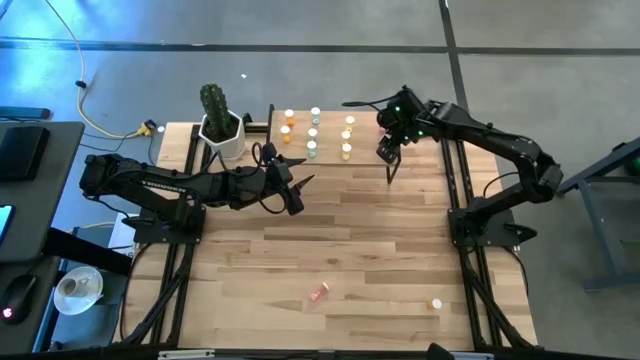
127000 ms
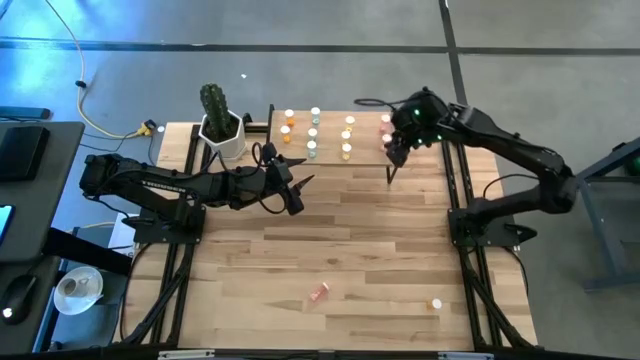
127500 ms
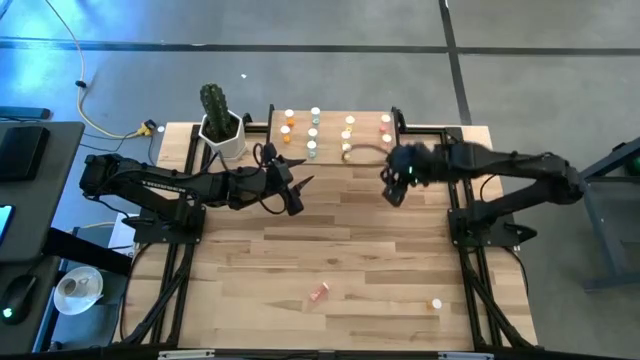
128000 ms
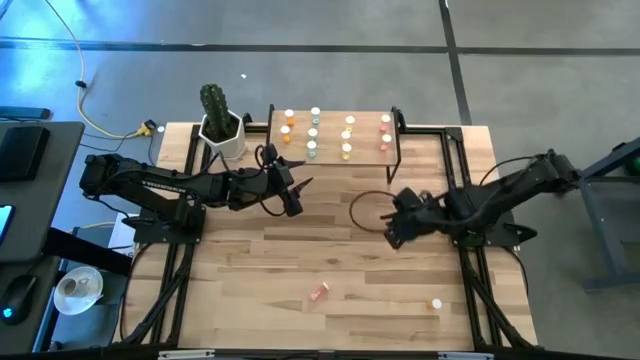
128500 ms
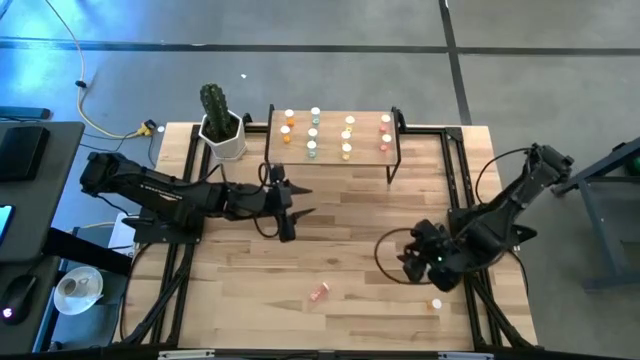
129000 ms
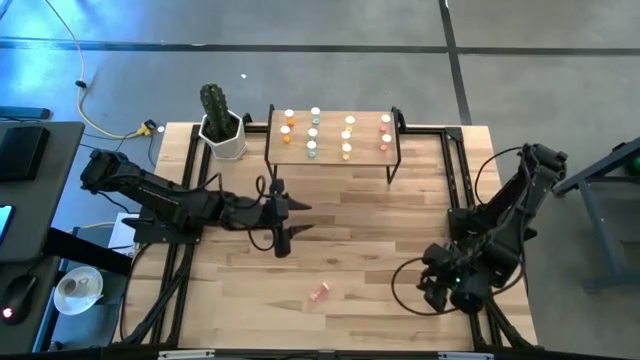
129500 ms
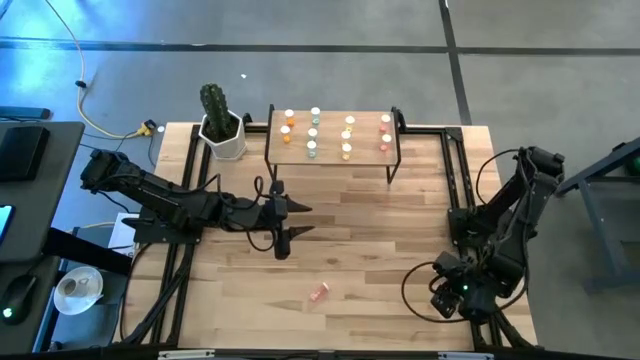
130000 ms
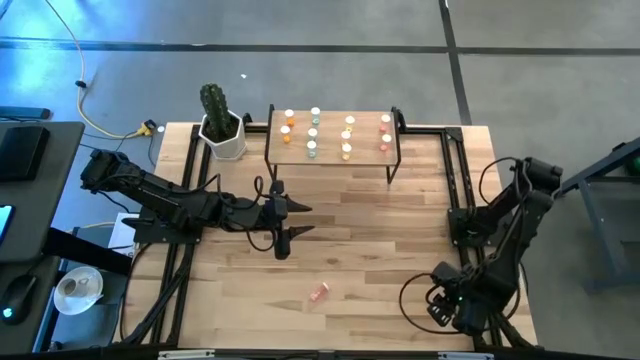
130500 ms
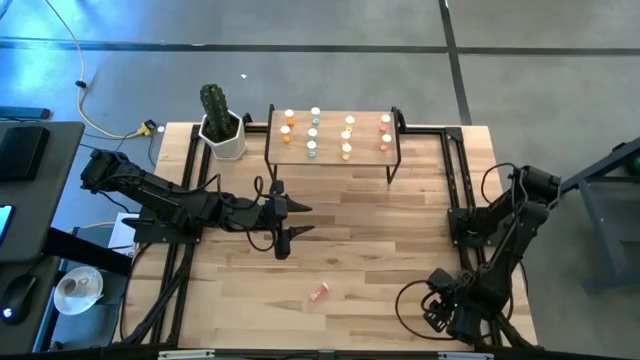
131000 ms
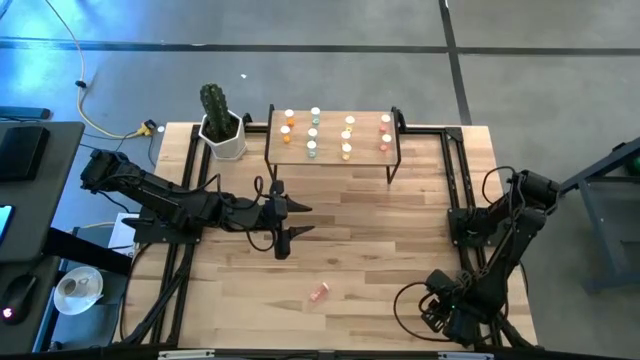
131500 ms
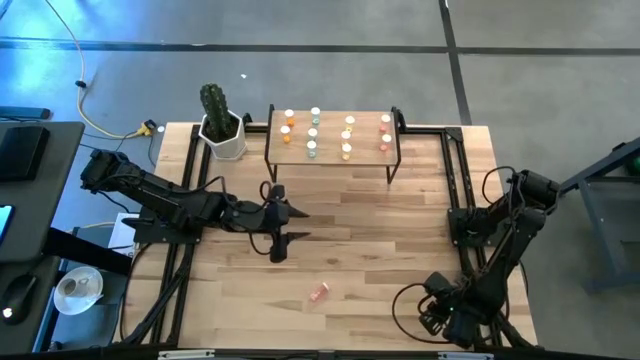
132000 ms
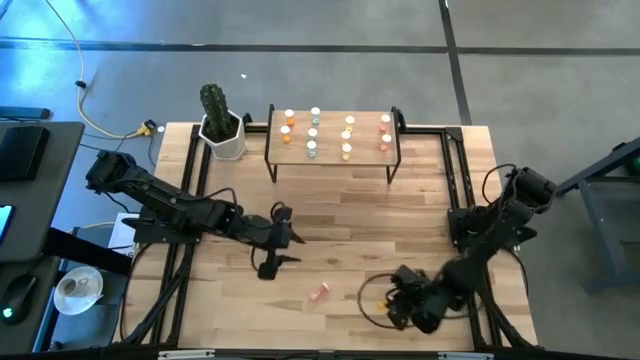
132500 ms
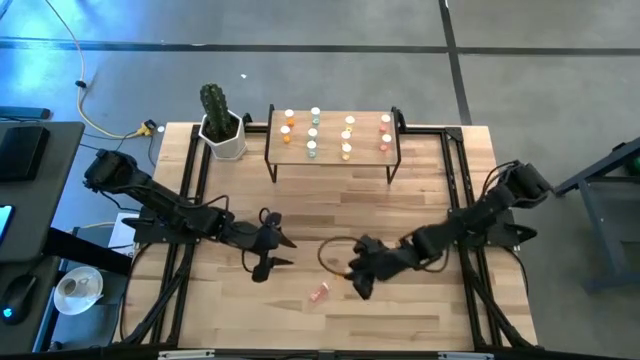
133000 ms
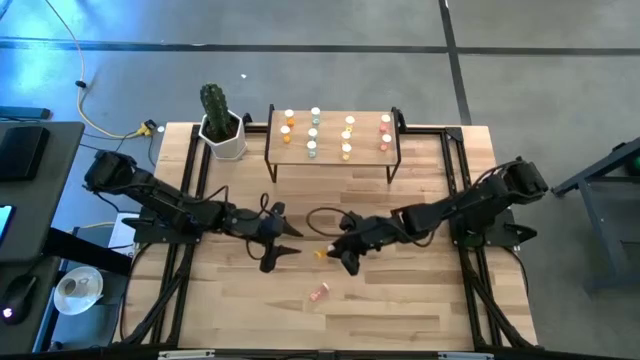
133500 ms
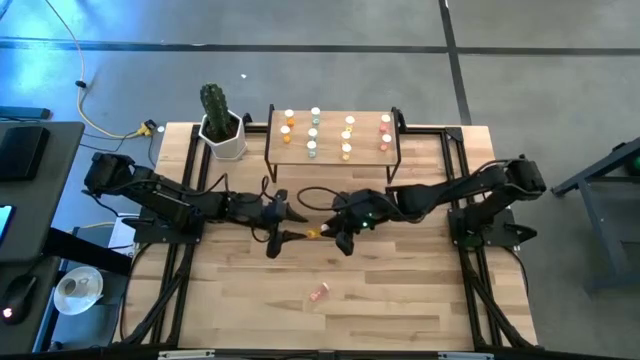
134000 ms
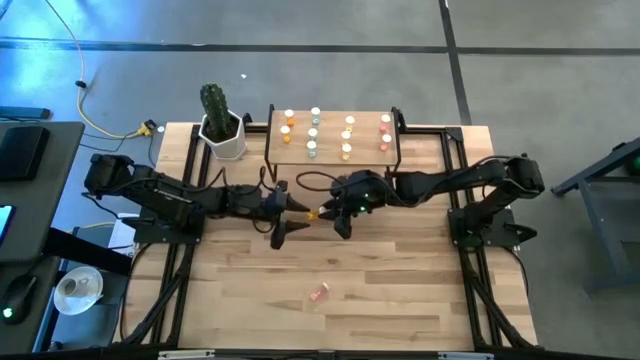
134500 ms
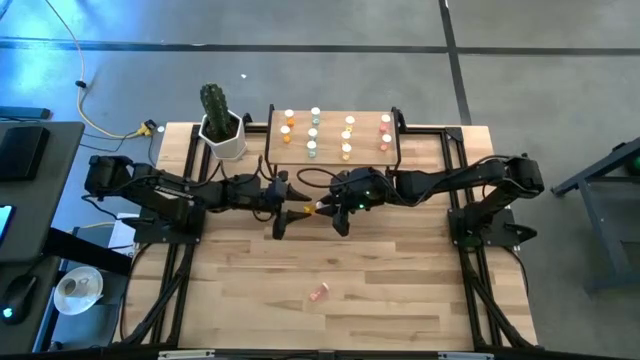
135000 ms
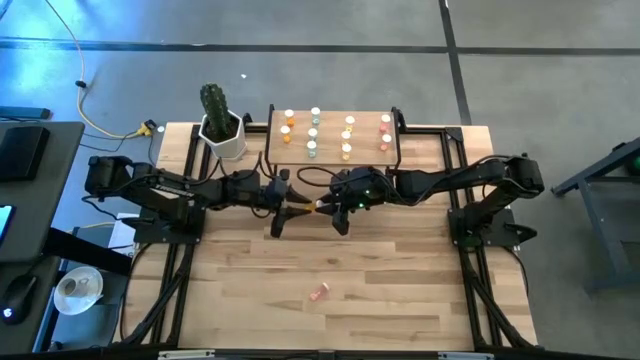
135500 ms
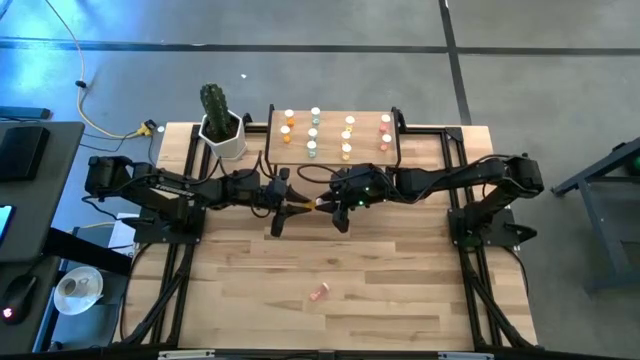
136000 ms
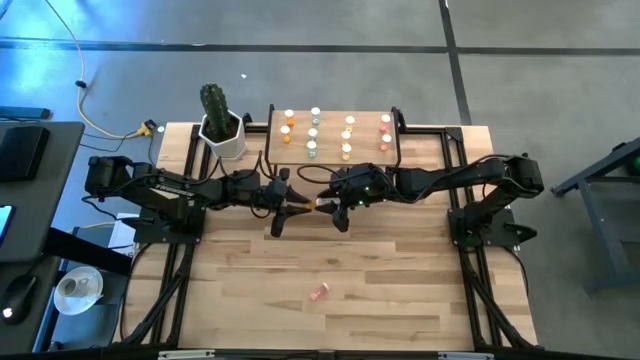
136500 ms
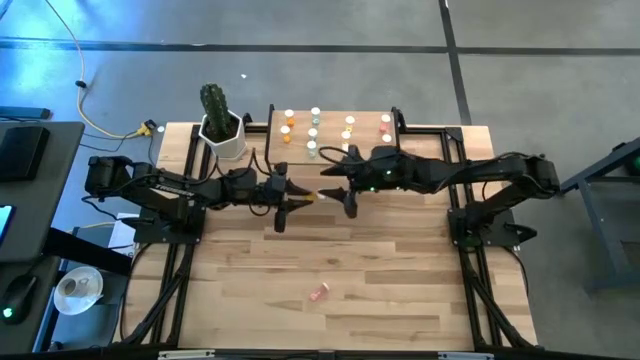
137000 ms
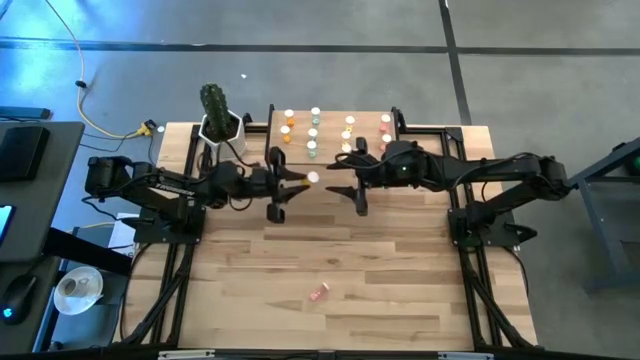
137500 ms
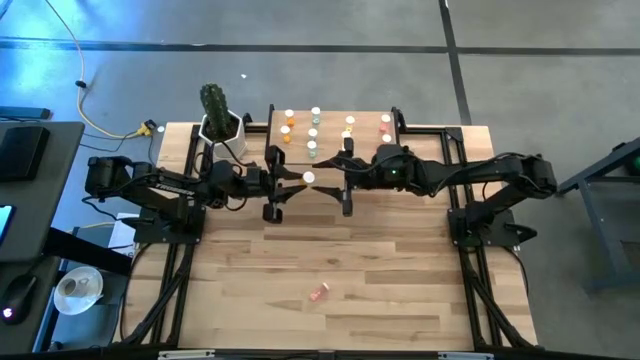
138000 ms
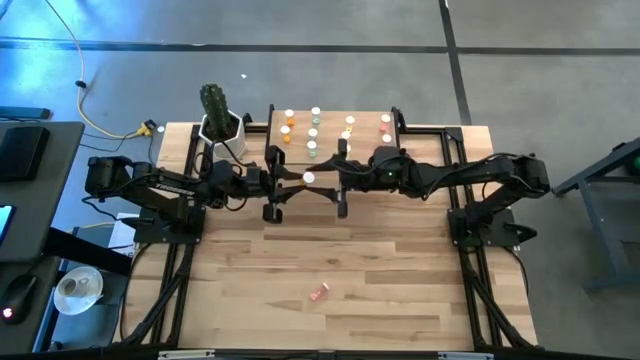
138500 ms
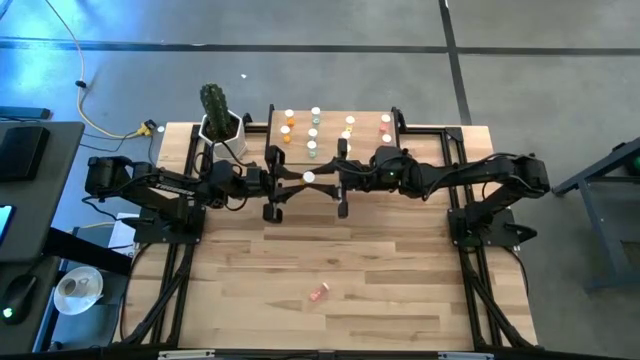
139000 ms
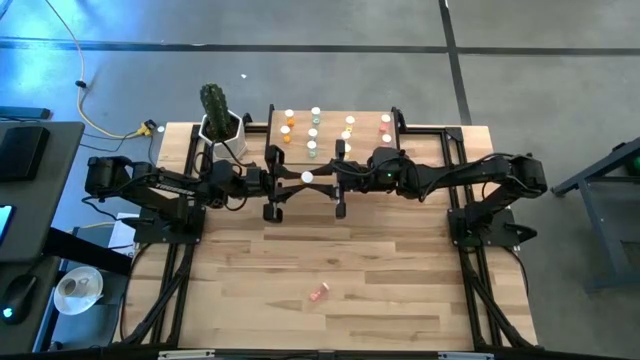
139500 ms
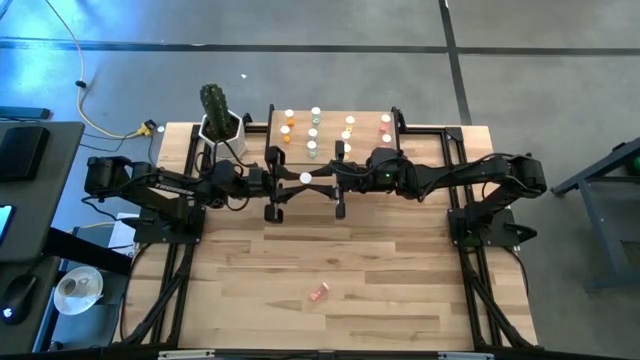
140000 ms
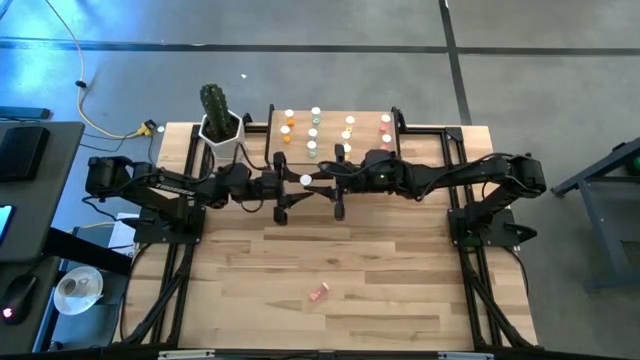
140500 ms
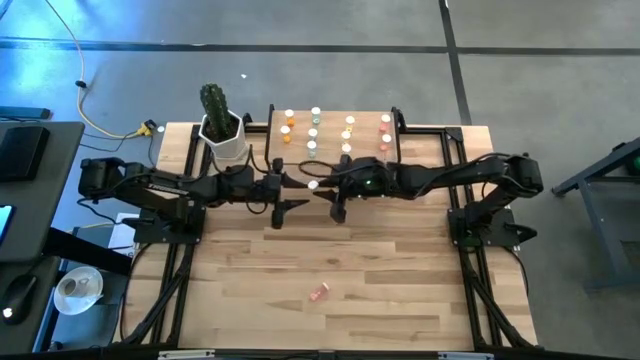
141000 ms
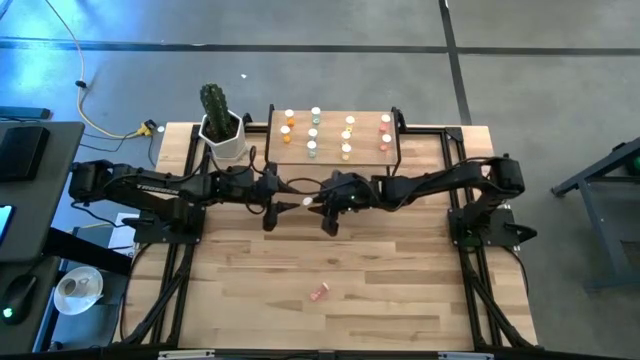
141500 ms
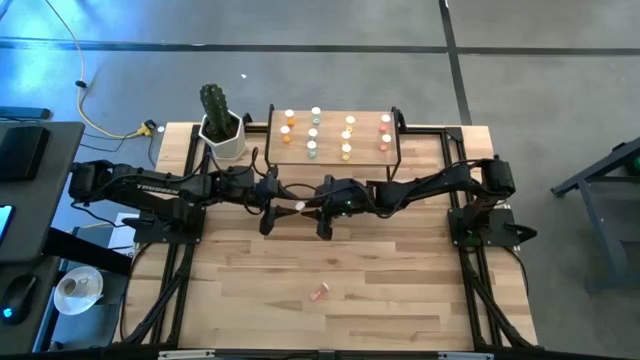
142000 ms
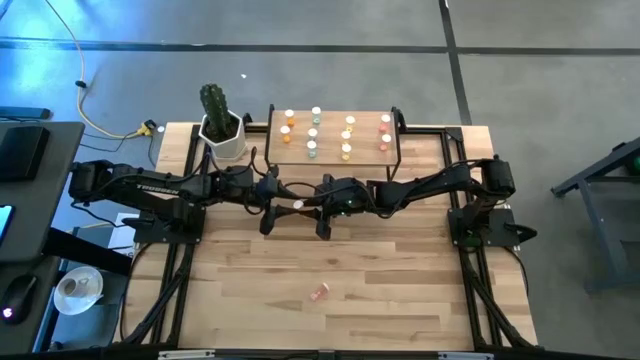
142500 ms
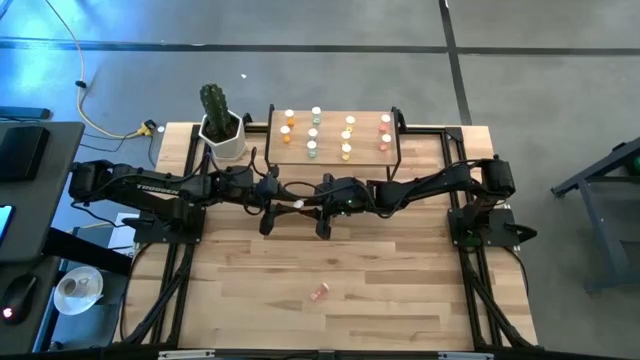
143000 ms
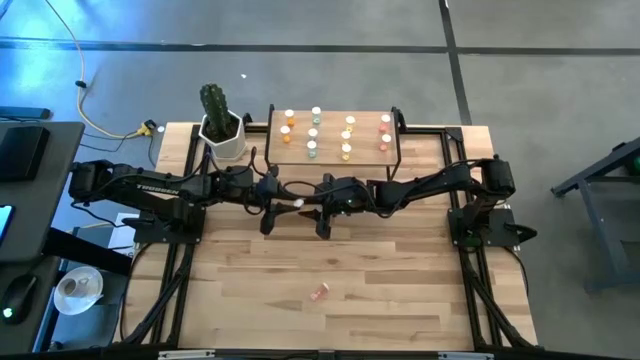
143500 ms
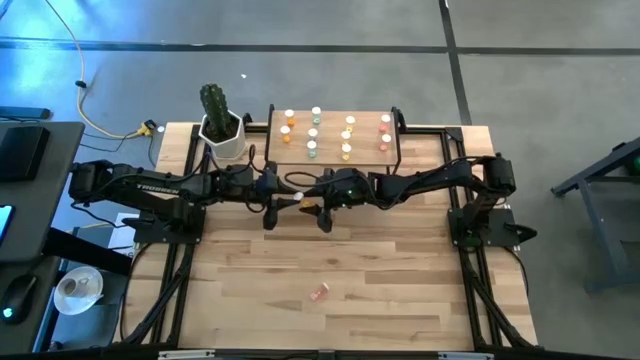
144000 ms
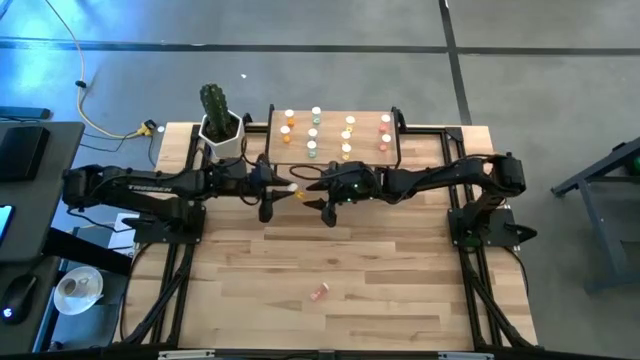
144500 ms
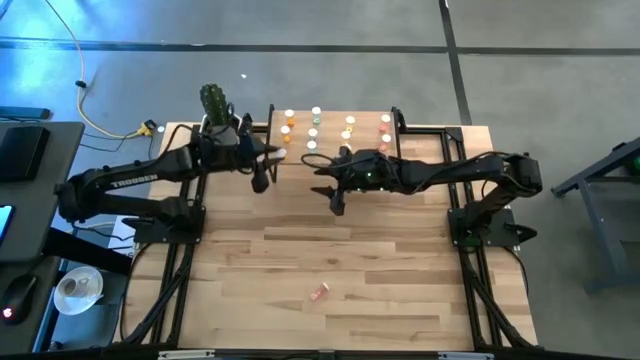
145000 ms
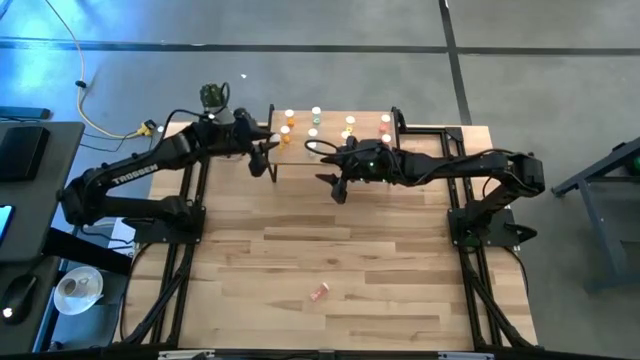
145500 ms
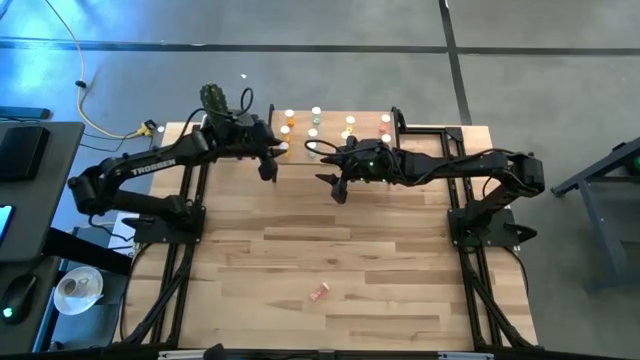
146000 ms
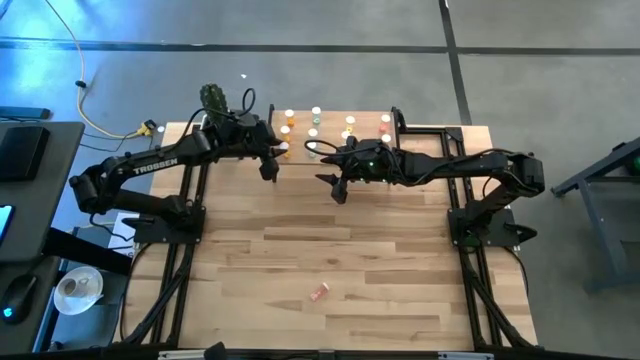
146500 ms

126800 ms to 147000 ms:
Task: Pick and place medicine bottles onto shelf by color
Put the orange pill bottle on the shelf

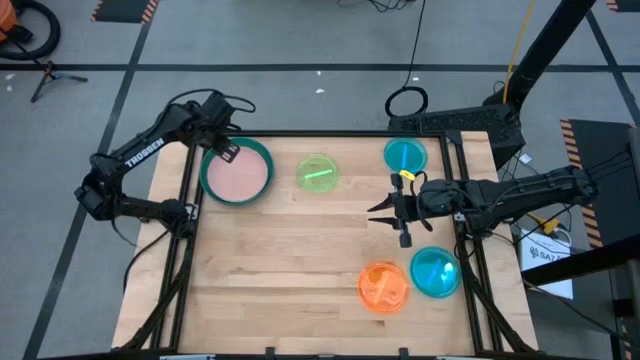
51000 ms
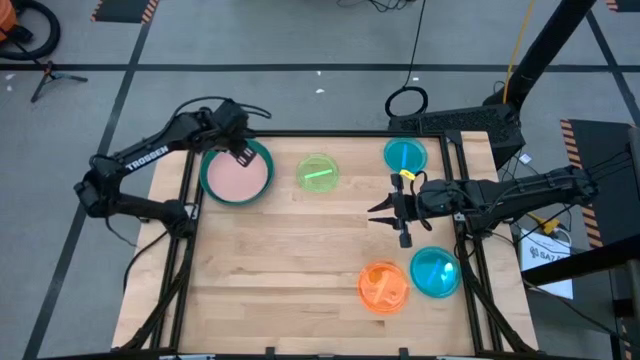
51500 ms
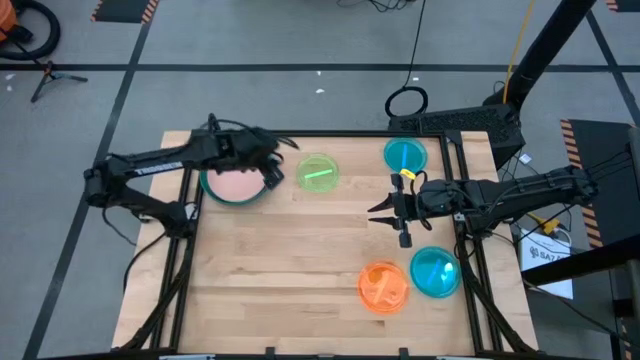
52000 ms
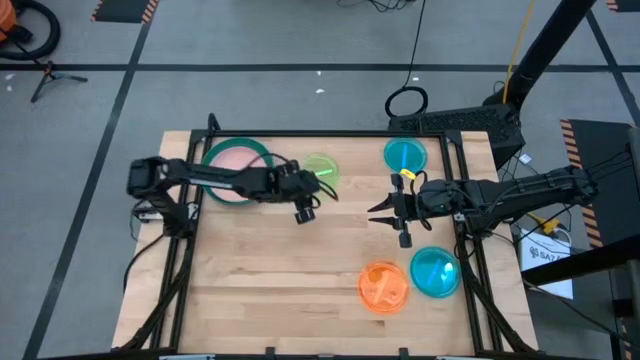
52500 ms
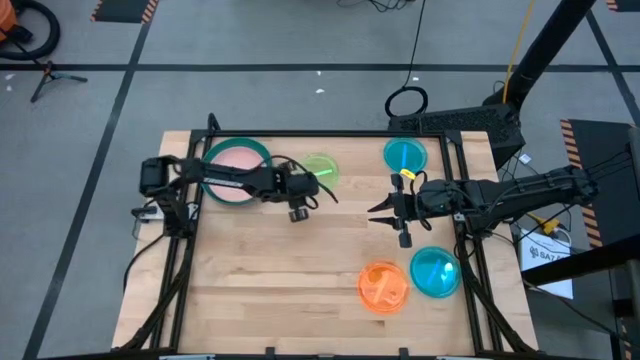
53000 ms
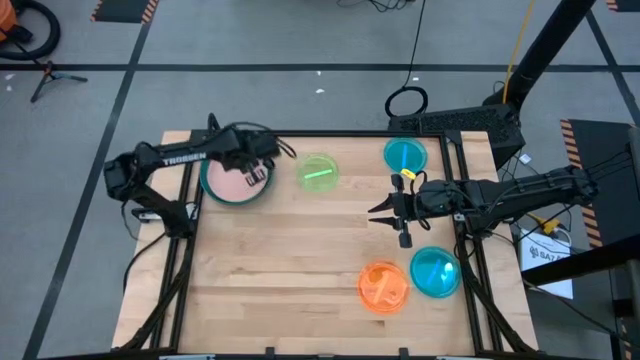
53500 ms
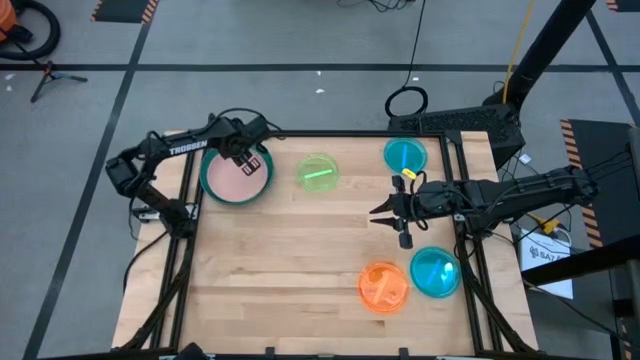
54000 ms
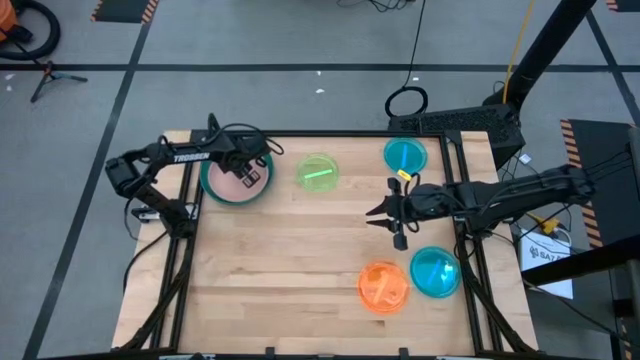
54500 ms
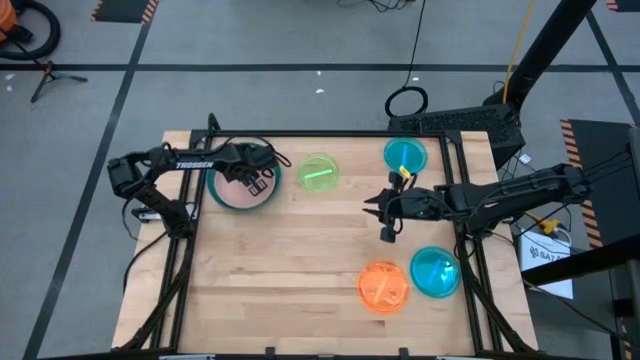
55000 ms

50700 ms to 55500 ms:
Task: Stack plastic plates
Adjust the stacked plates on the table
